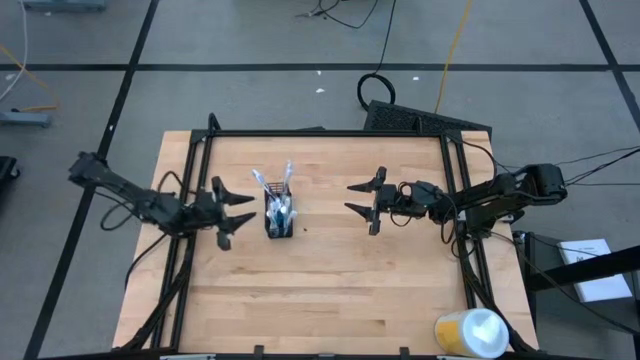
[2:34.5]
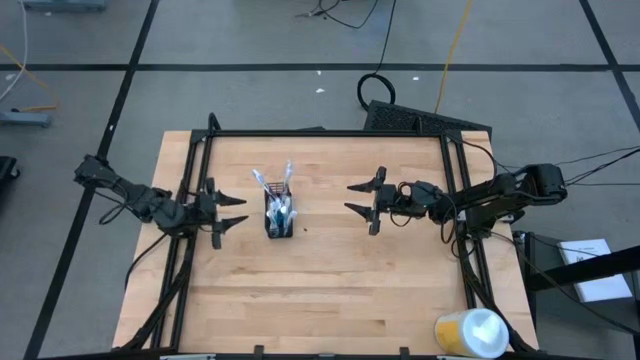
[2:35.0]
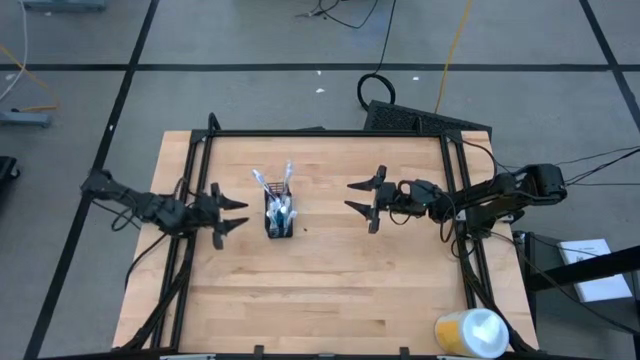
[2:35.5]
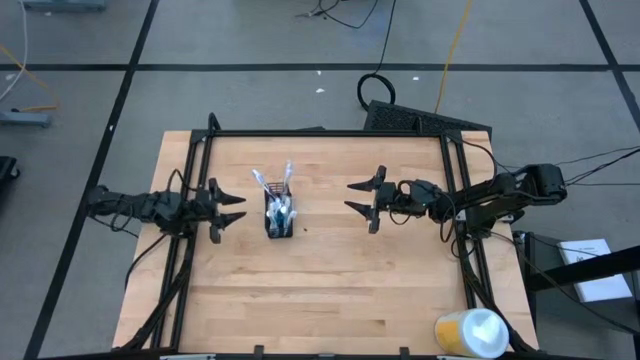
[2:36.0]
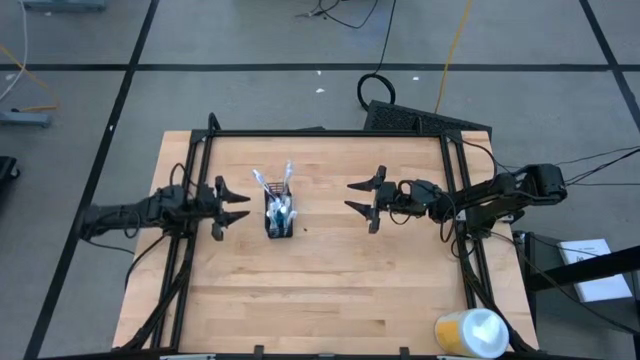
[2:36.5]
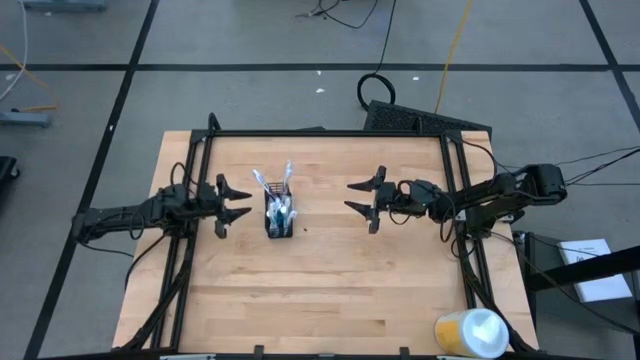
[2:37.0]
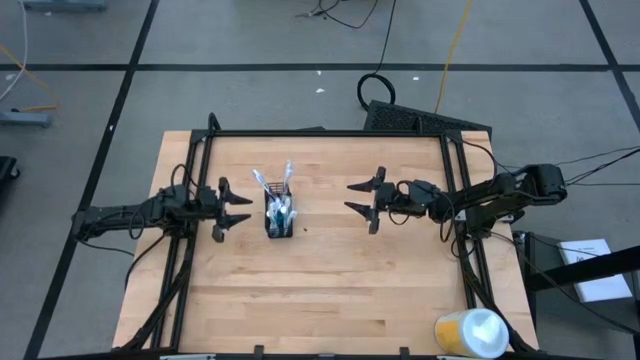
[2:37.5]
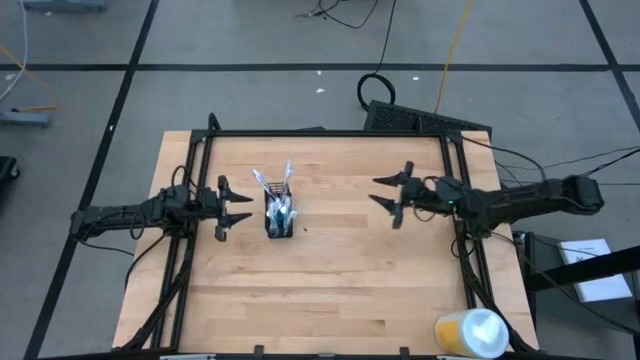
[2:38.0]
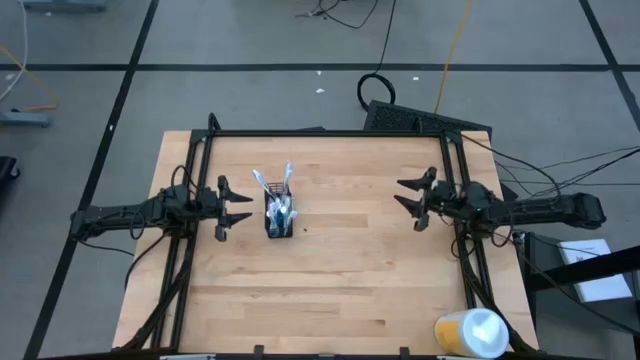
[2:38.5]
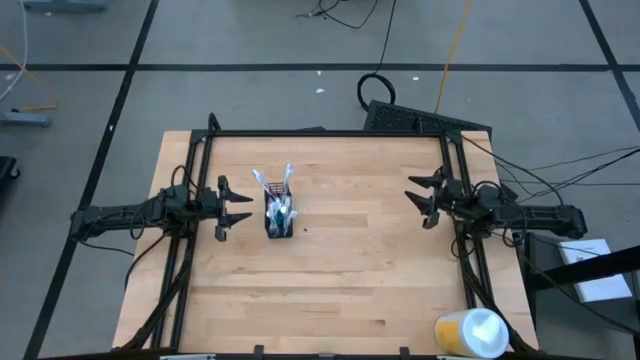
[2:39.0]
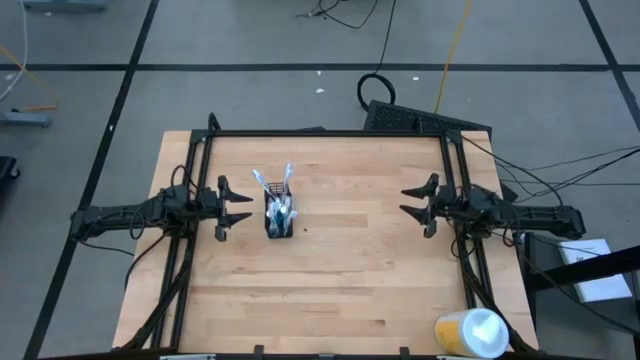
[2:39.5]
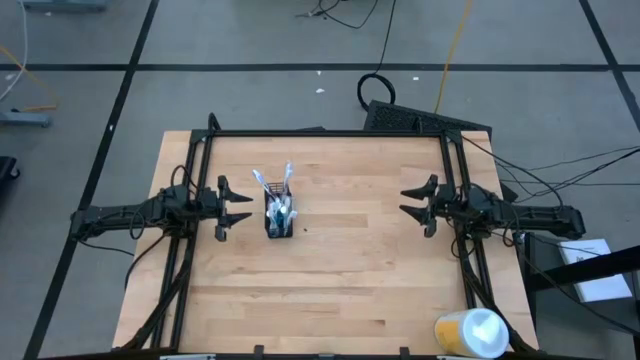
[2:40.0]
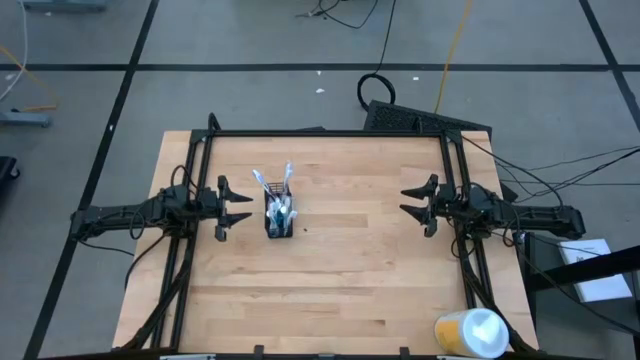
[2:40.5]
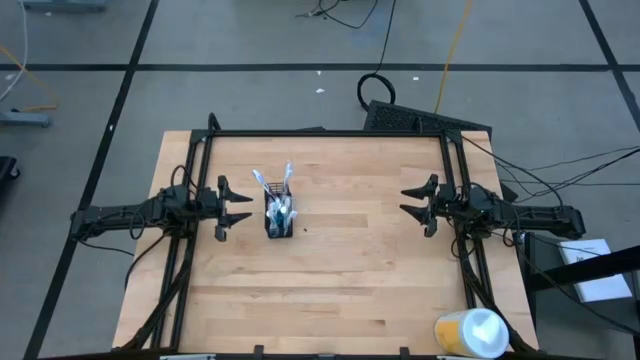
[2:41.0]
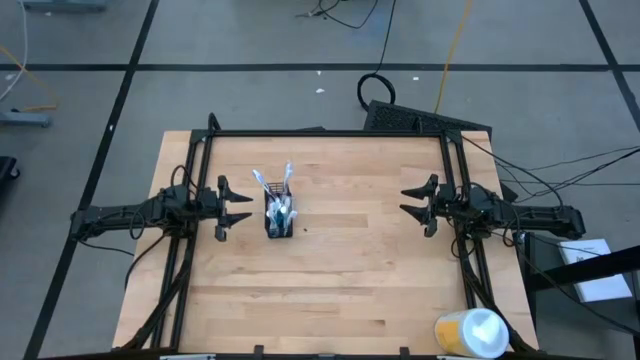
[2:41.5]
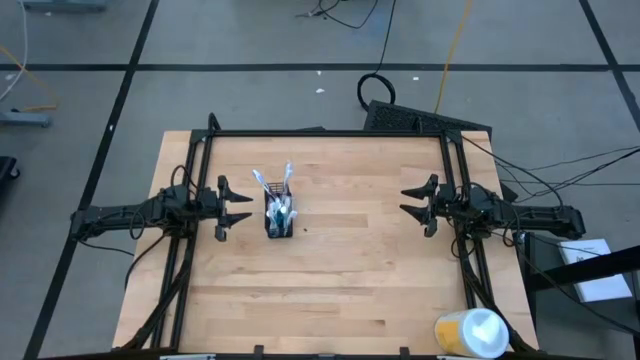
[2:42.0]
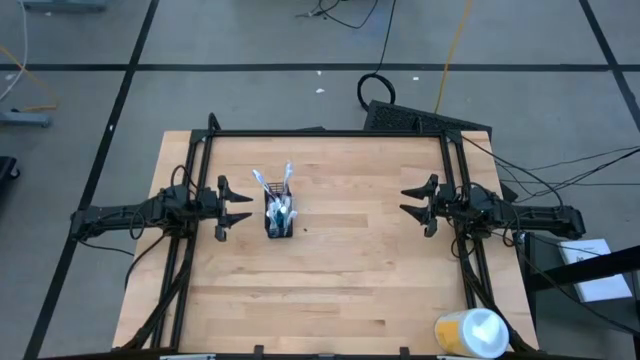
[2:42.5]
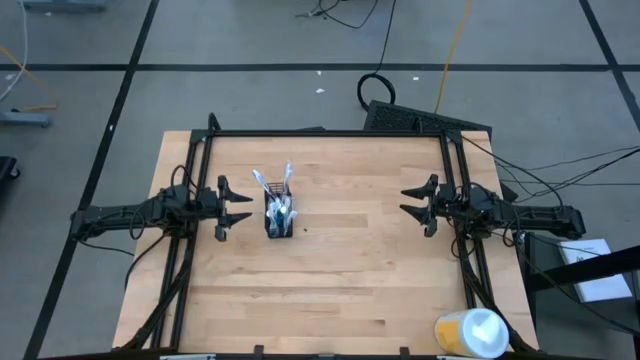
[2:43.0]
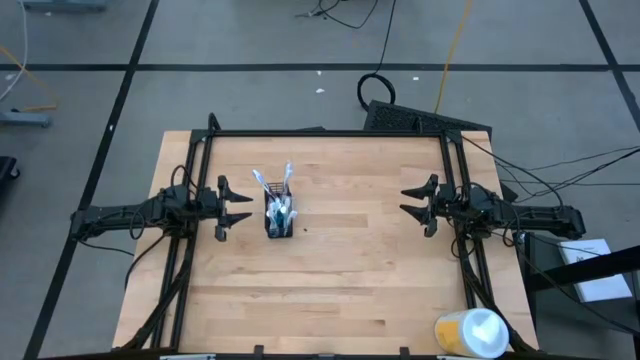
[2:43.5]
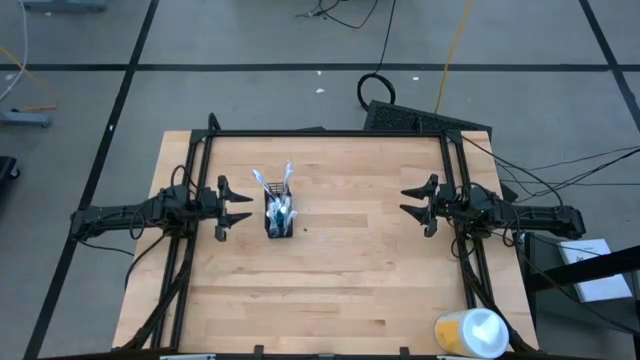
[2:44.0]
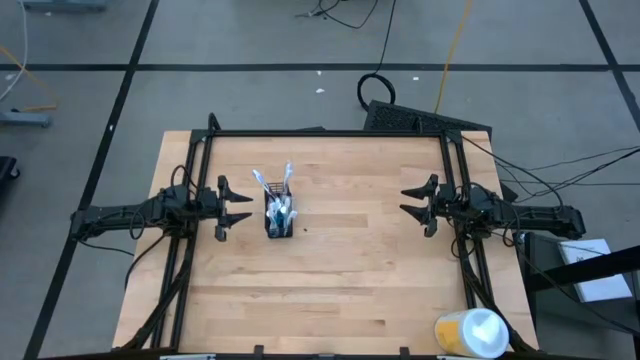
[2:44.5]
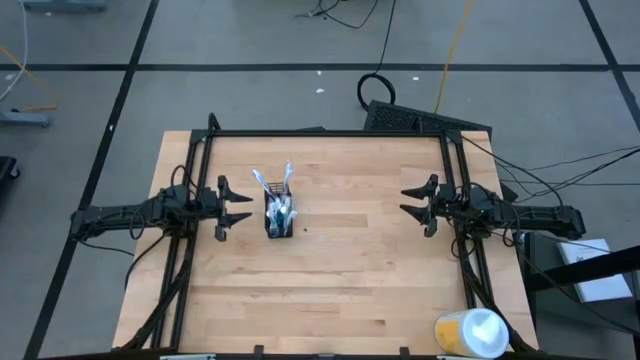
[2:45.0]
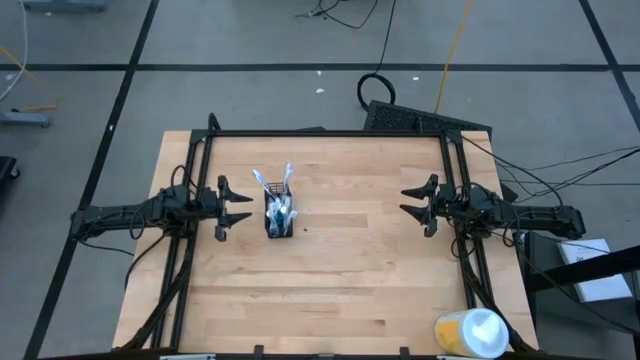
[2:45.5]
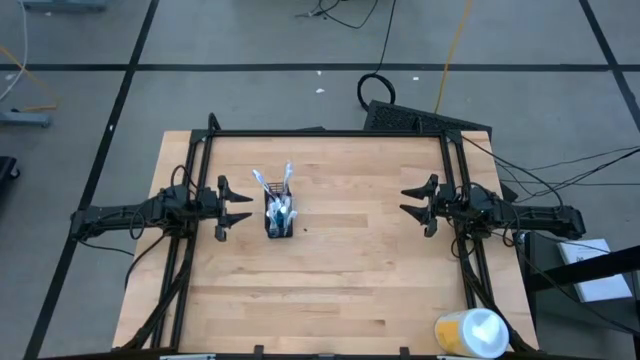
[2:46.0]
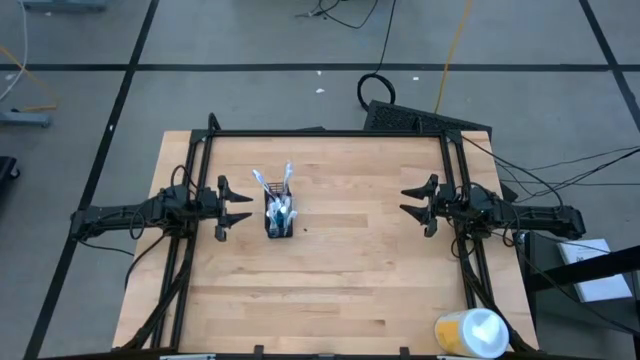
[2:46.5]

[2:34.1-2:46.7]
Task: Pick & Place toothbrushing station
Return to Home Position

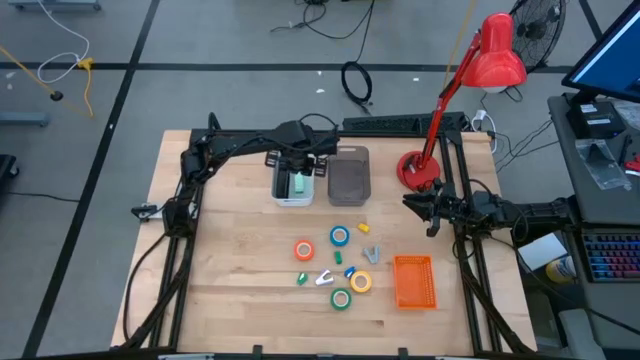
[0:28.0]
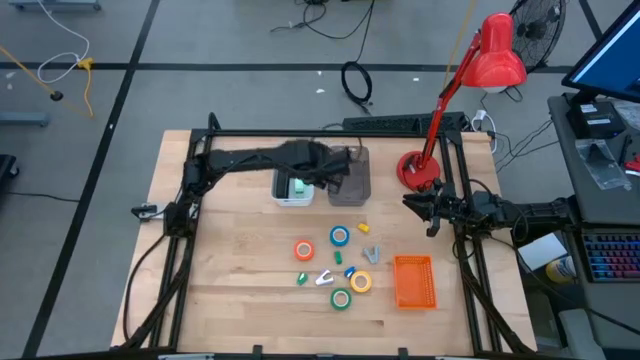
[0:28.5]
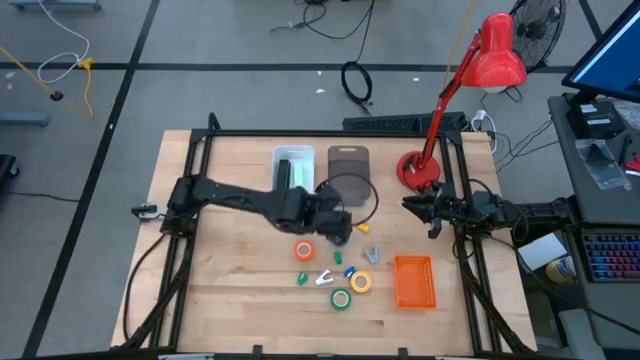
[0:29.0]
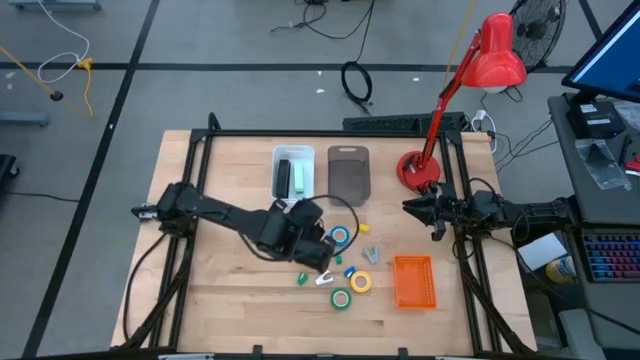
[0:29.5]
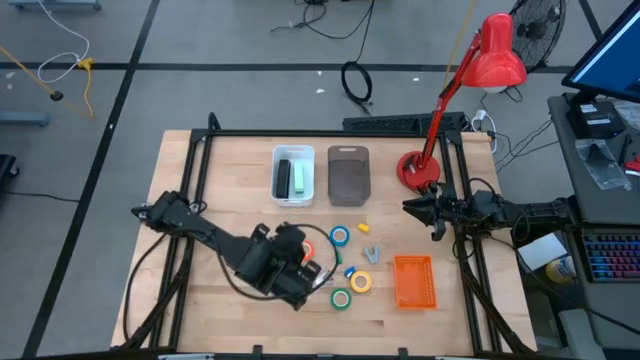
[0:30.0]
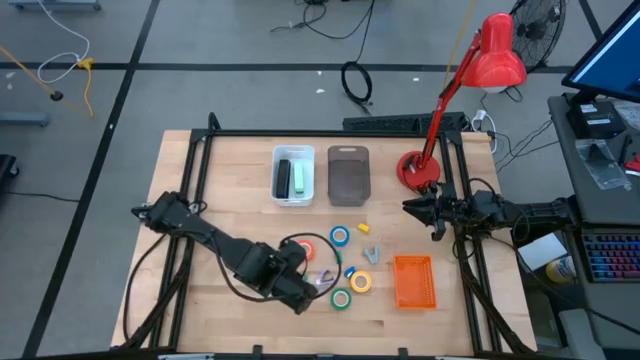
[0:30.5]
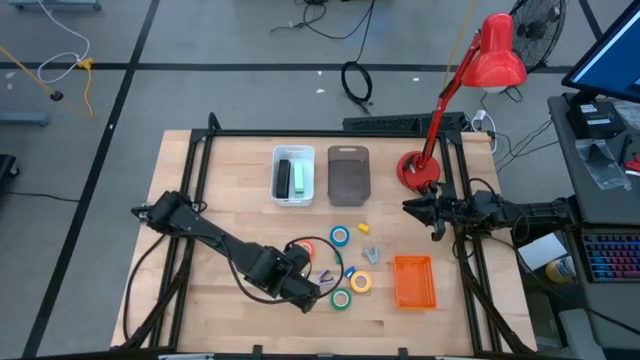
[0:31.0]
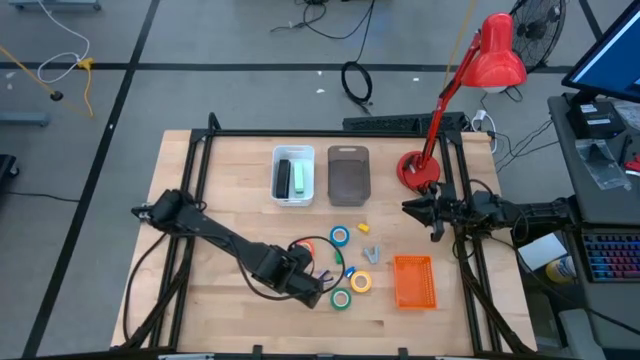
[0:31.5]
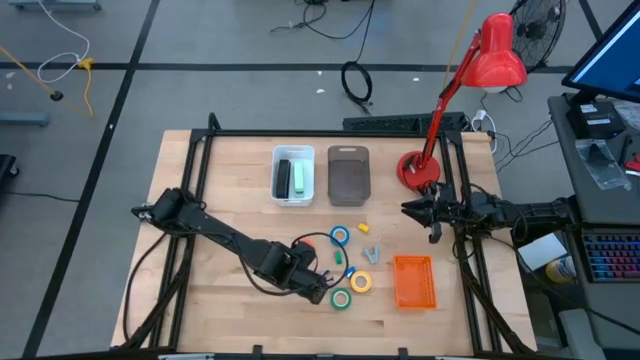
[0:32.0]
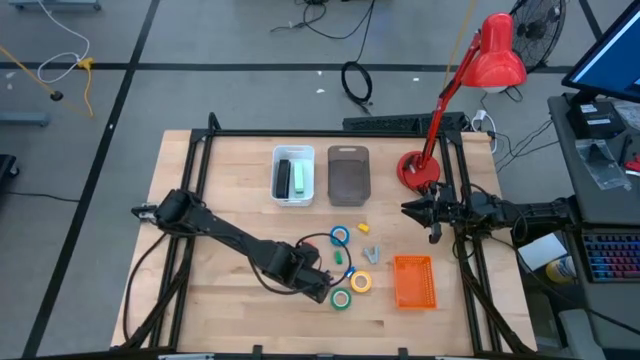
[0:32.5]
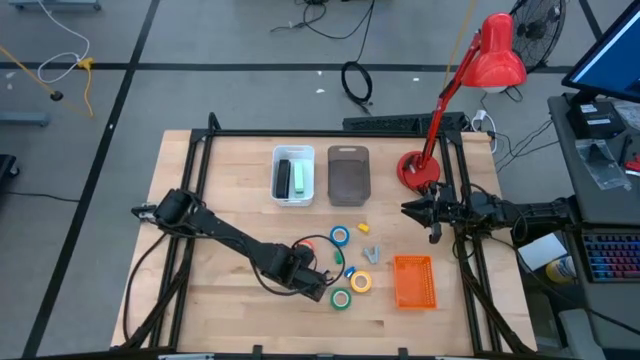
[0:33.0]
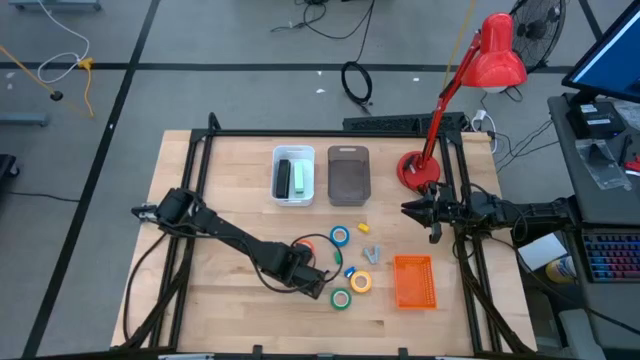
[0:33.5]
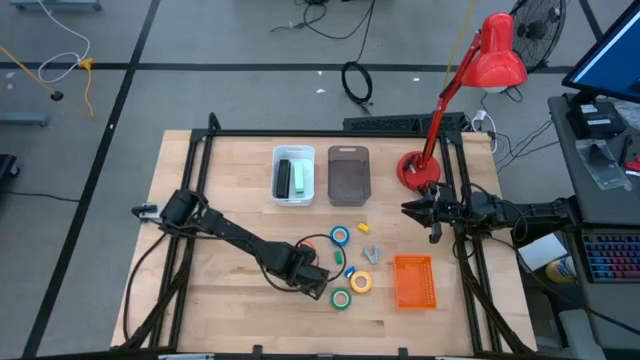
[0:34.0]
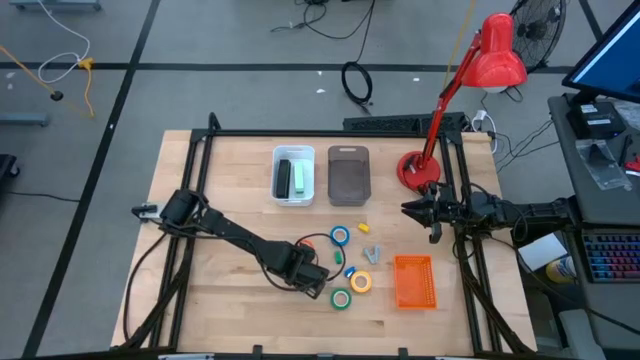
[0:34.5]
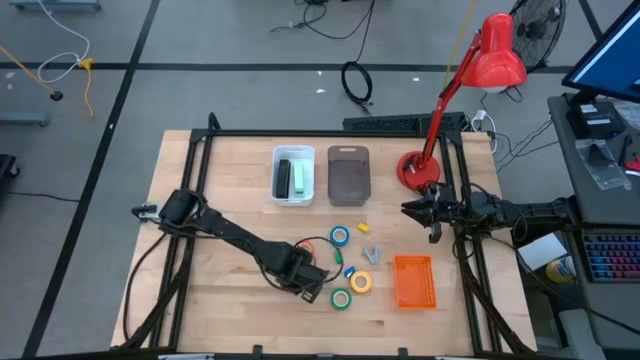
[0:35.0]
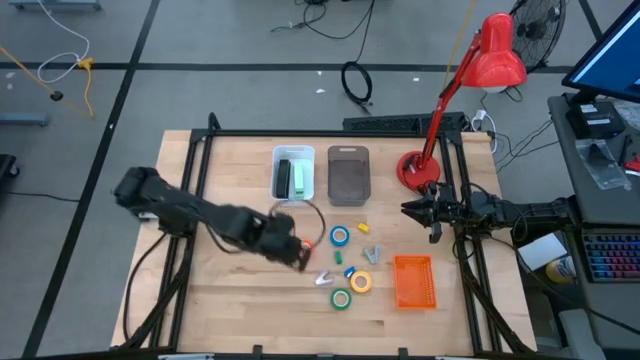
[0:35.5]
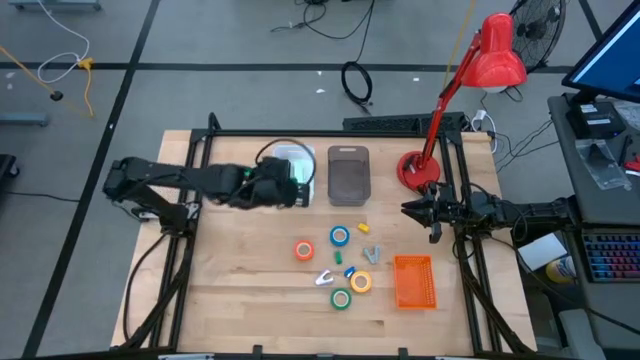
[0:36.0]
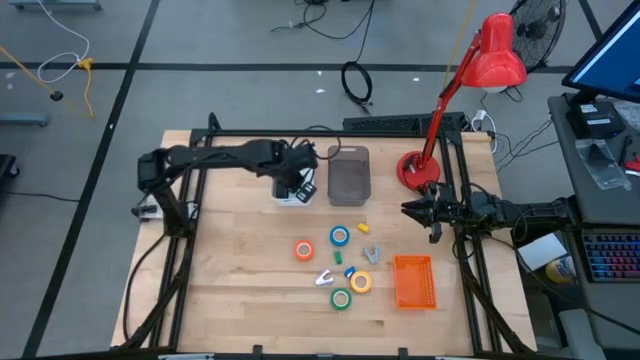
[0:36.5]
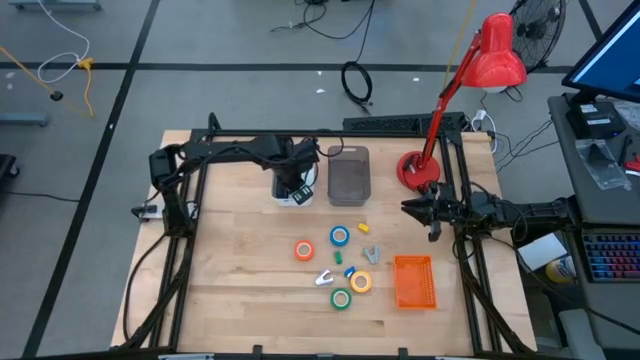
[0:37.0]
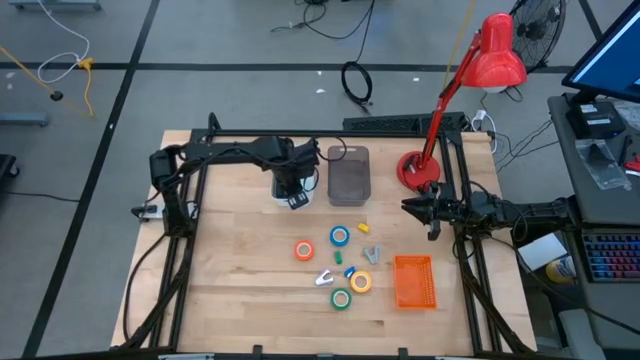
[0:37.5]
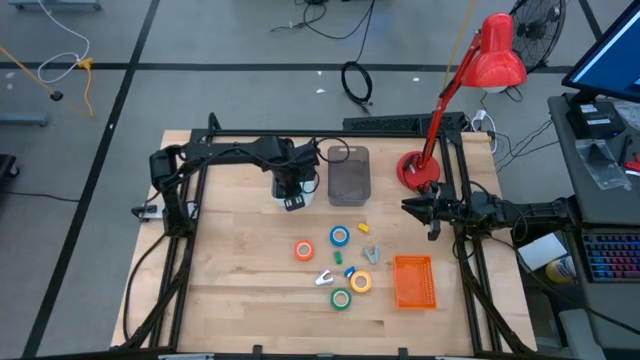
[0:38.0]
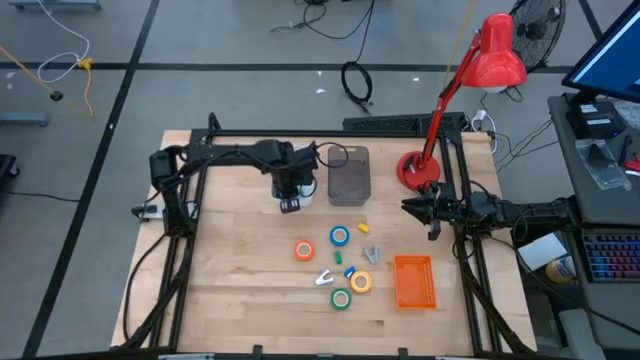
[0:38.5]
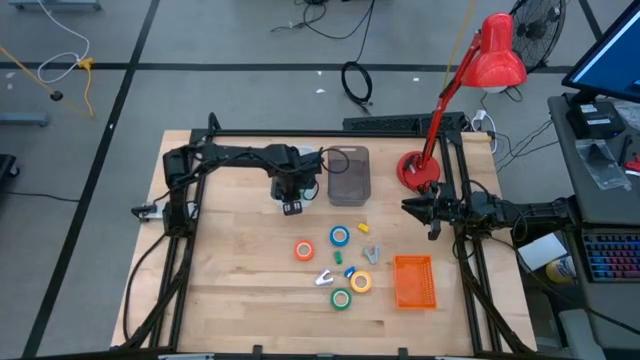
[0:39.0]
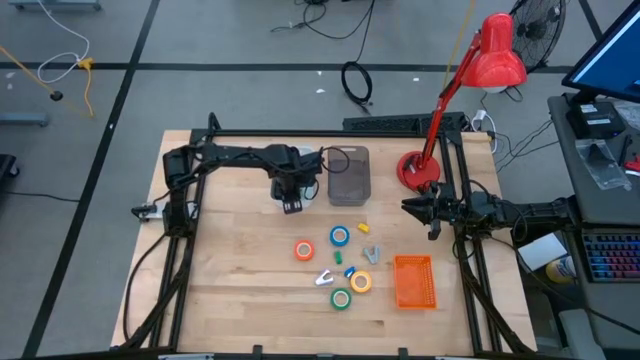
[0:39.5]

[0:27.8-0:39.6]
Task: Pick and place Stapler, Stapler remover, tape
Put the bottom green stapler into the white bin
